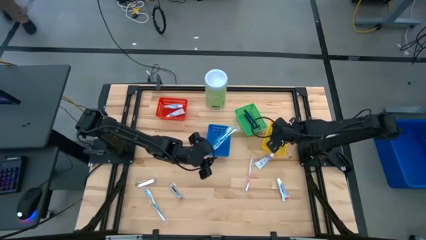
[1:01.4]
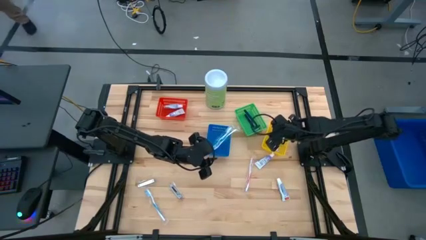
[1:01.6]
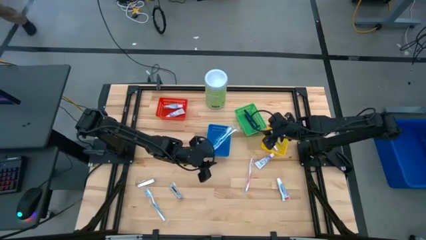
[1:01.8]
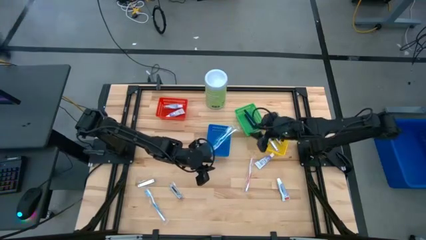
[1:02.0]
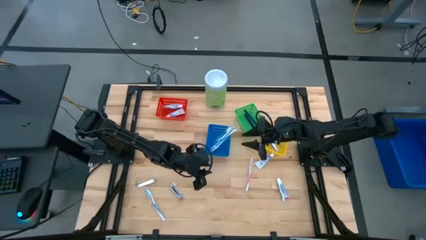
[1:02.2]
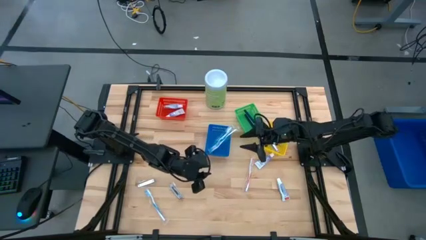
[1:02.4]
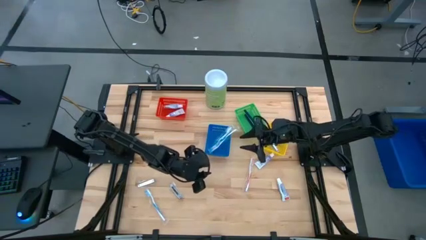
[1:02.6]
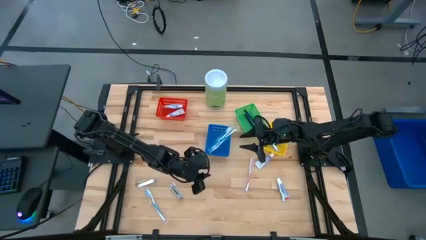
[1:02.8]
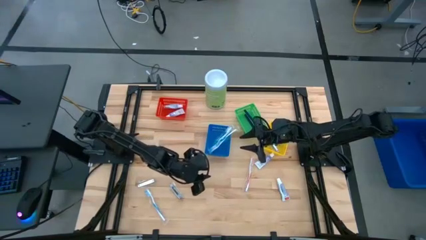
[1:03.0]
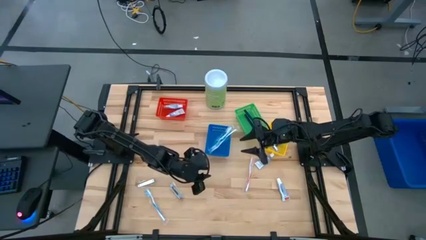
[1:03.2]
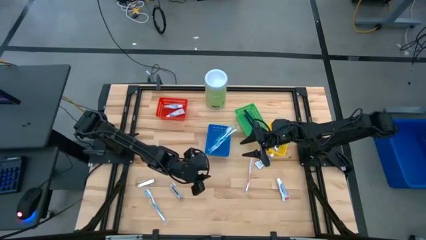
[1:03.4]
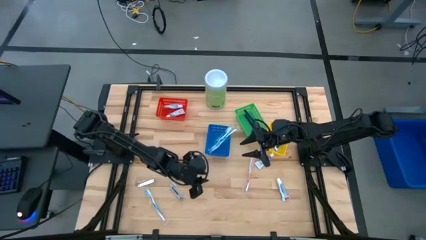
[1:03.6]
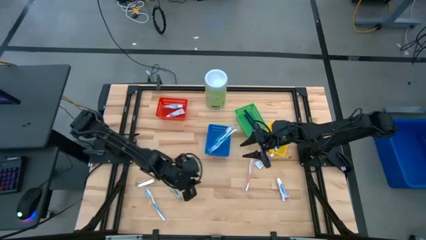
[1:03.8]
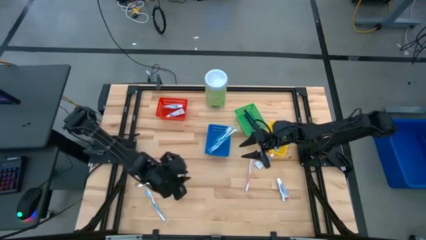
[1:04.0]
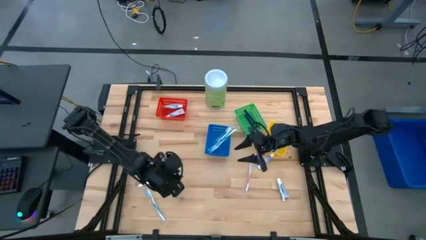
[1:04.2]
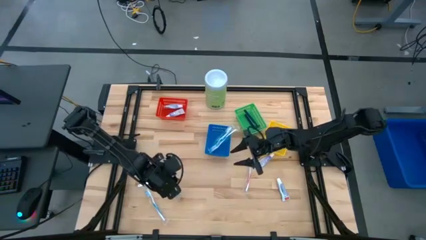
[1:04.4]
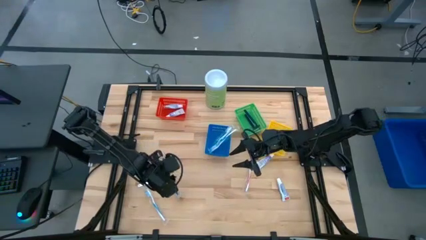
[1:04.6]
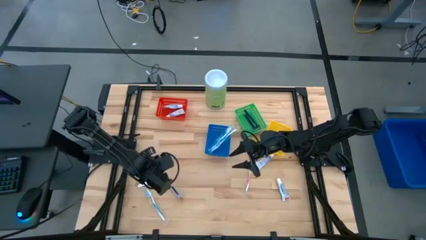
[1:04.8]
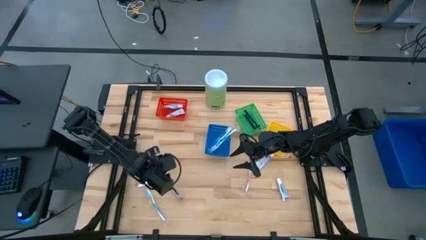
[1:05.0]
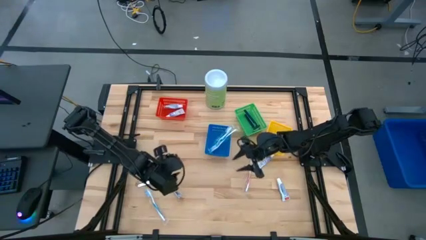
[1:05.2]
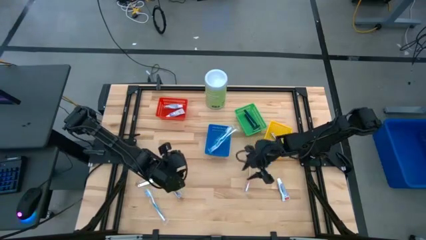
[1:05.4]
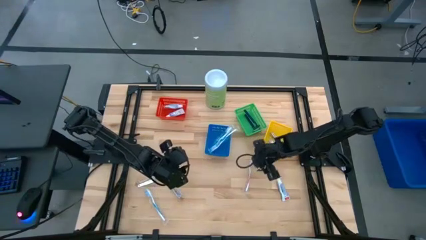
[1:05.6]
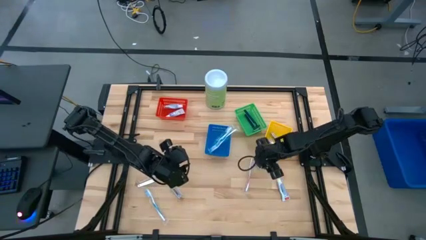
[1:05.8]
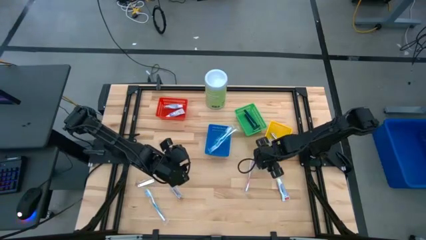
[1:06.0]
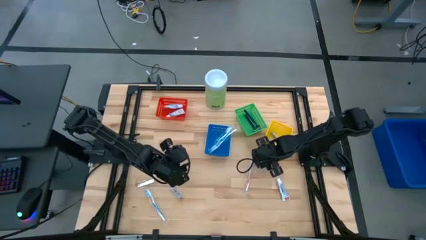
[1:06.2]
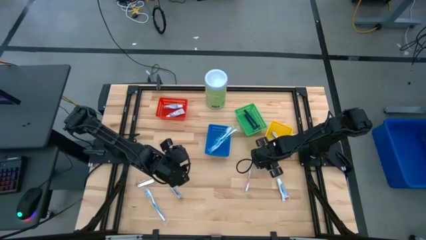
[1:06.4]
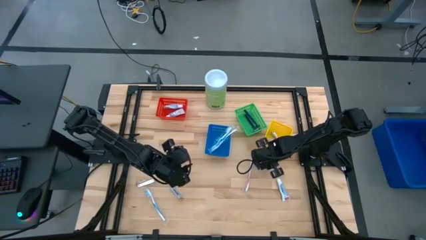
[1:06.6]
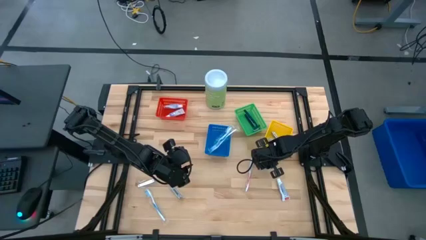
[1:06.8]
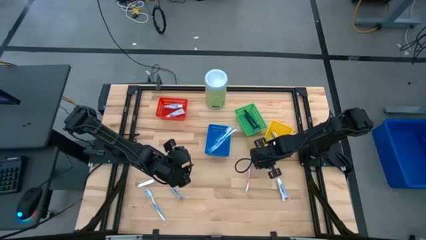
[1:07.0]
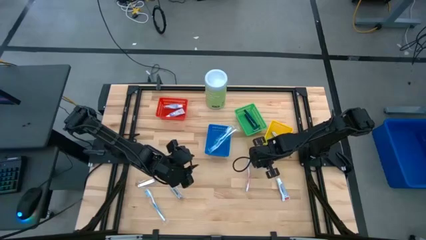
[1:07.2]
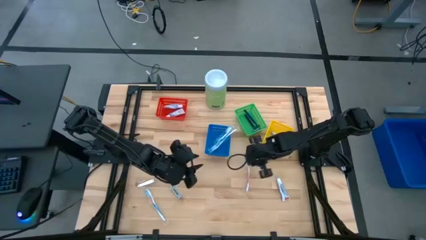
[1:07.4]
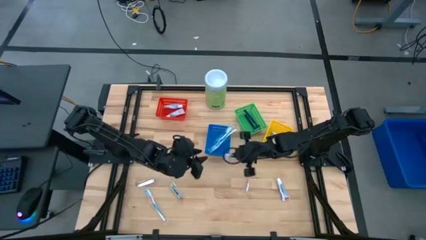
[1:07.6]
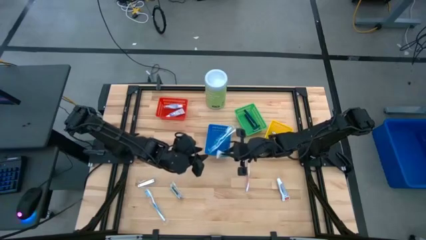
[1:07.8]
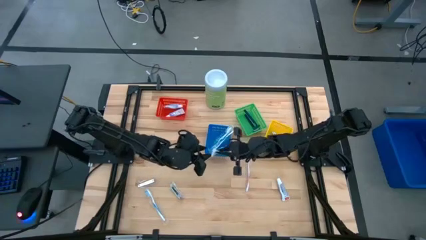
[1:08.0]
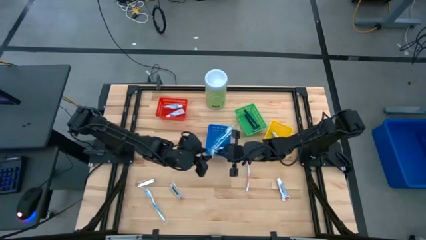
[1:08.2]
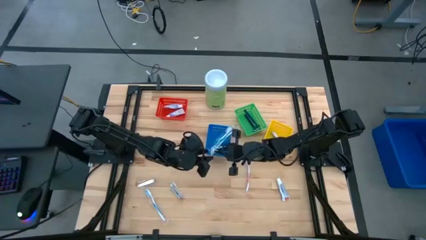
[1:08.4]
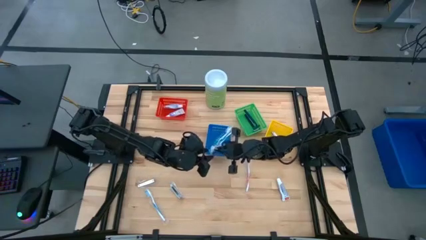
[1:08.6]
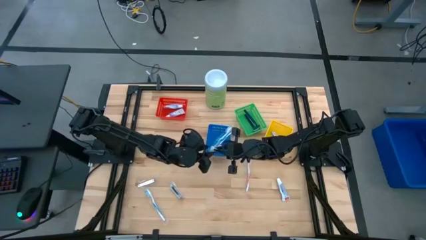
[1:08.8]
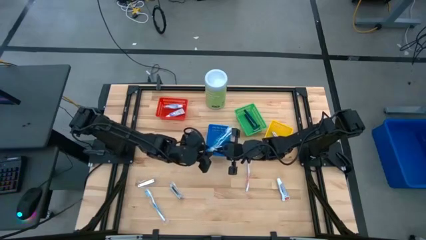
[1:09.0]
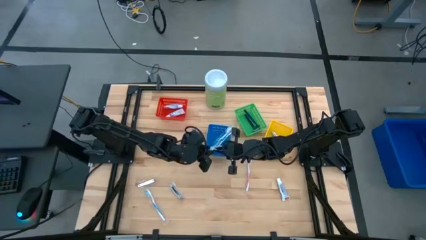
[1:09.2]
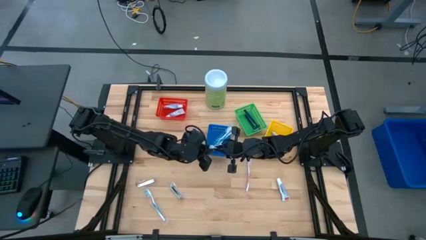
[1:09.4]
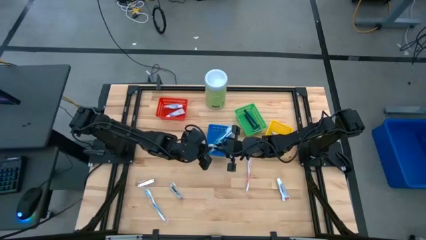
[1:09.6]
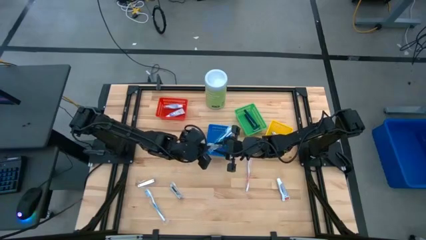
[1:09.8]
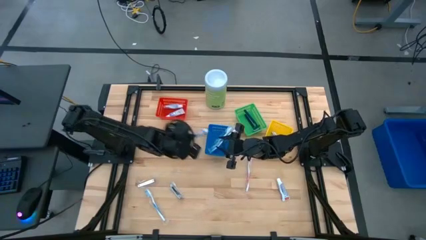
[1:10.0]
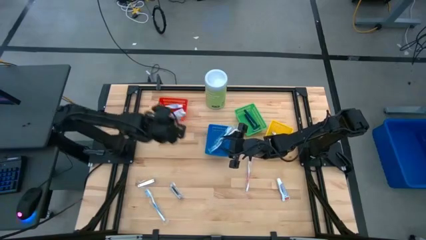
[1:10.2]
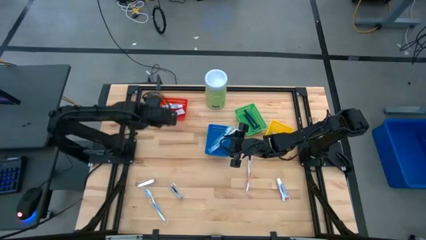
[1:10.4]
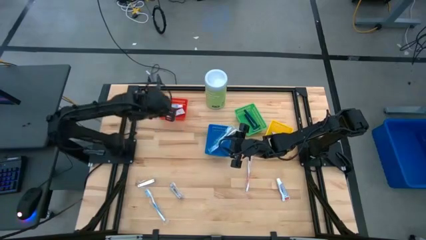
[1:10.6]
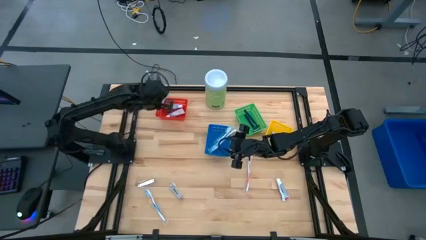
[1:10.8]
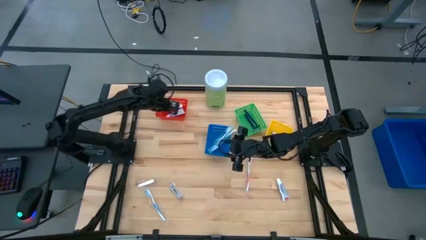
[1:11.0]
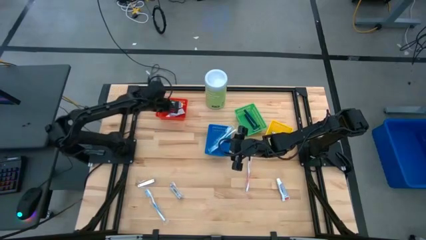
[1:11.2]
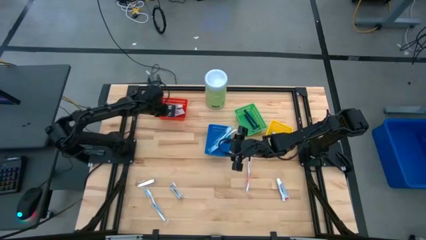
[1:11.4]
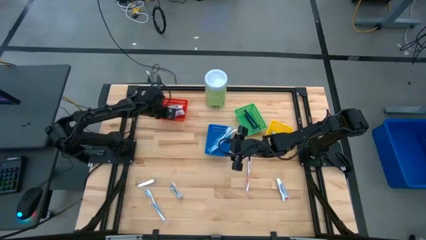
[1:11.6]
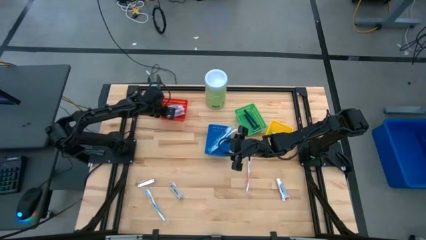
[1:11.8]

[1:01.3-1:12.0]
Task: Pick & Place Travel size toiletries
Put the white toothpaste into the red bin

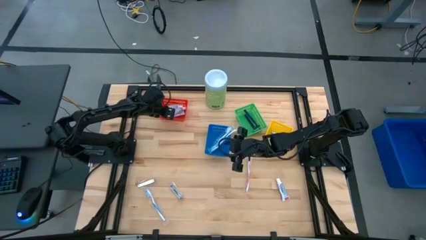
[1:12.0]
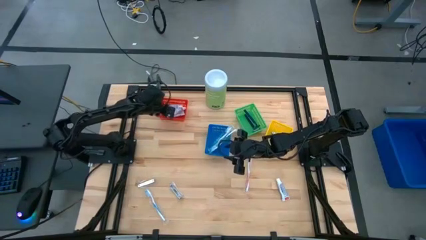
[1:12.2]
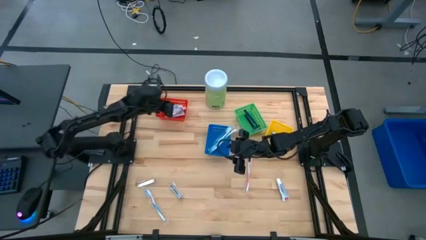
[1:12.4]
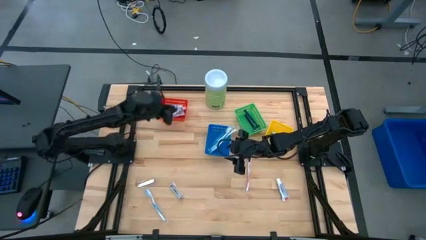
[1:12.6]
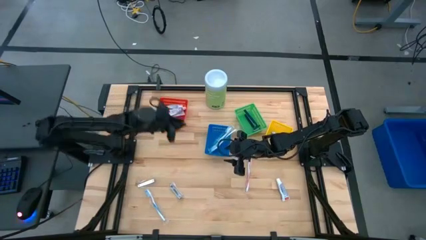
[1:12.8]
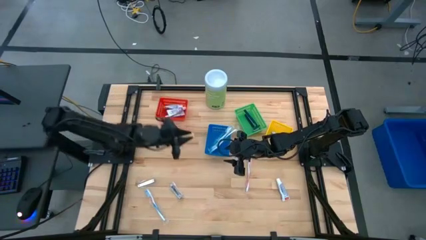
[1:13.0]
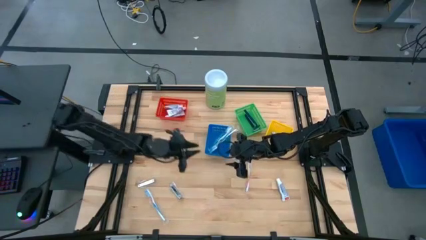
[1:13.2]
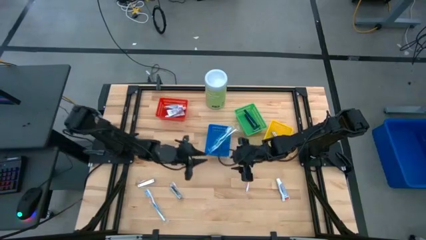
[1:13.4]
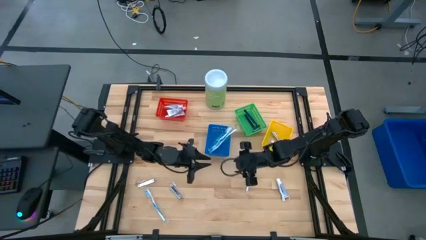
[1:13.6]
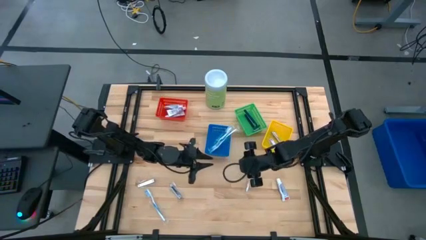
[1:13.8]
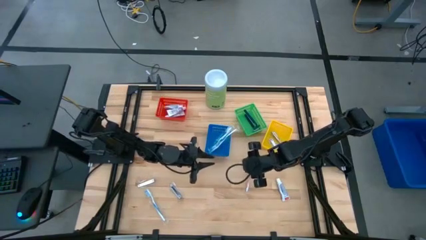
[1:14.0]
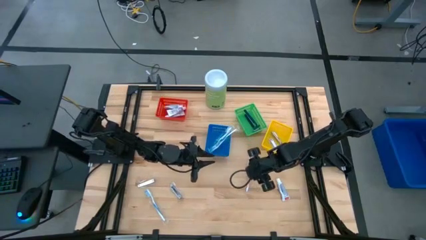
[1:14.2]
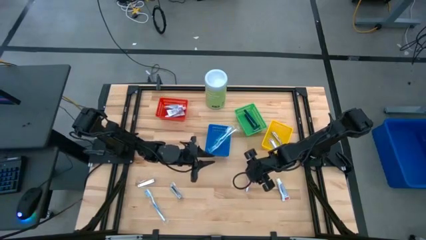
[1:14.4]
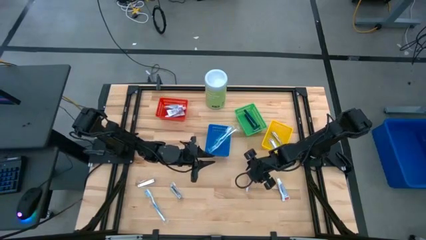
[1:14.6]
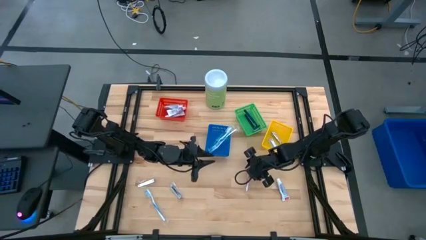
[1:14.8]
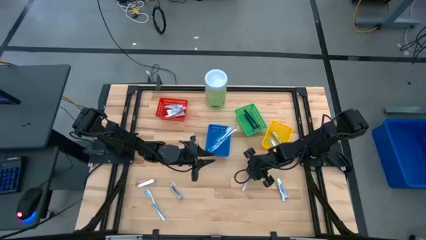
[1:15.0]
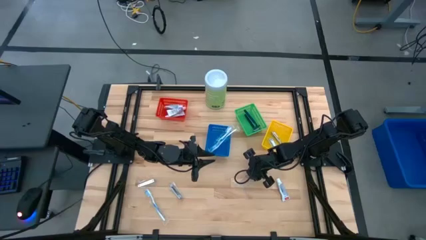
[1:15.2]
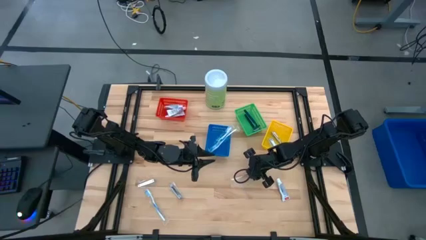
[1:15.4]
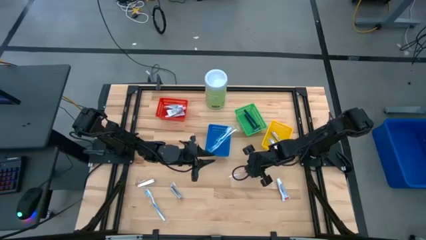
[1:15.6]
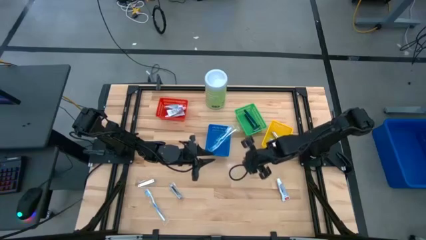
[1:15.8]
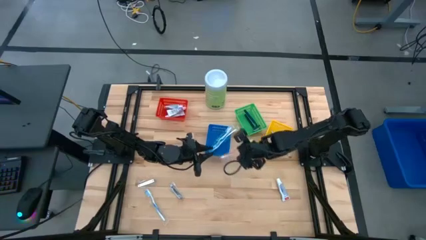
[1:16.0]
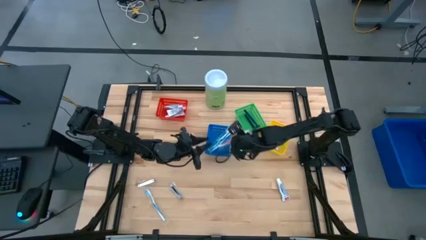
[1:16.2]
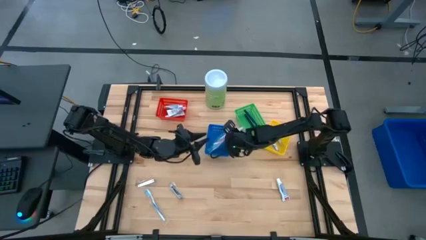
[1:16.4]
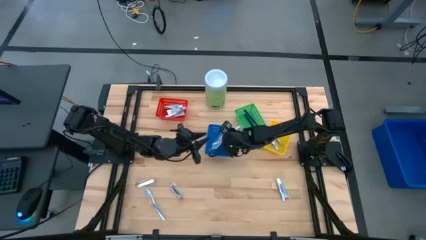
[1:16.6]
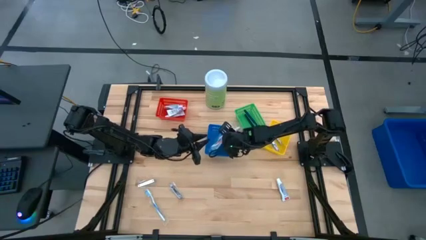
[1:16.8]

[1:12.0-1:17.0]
Put the orange toothbrush into the blue bin

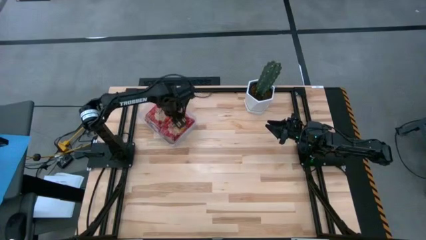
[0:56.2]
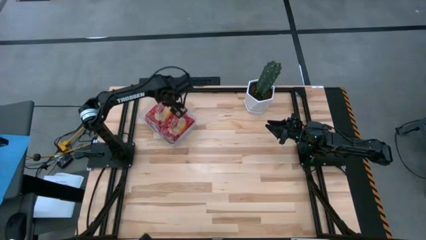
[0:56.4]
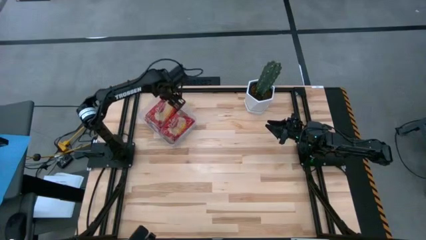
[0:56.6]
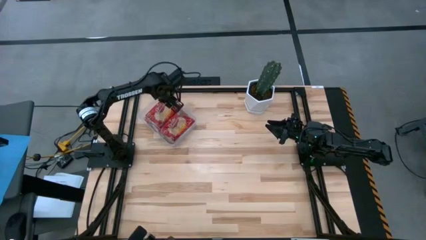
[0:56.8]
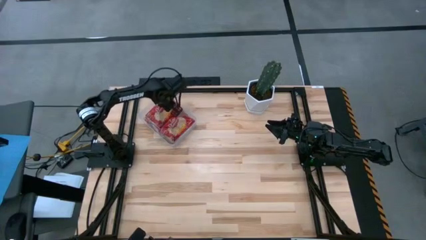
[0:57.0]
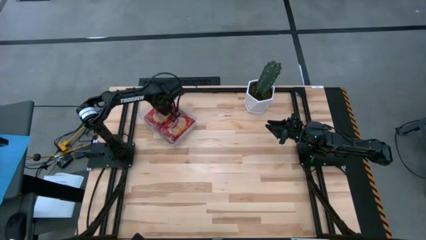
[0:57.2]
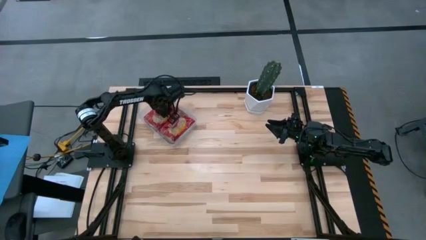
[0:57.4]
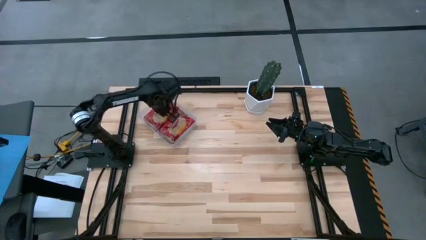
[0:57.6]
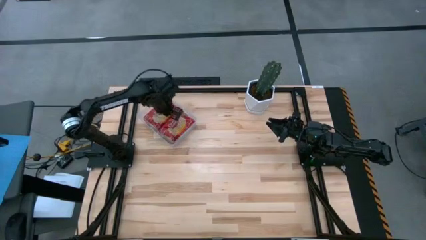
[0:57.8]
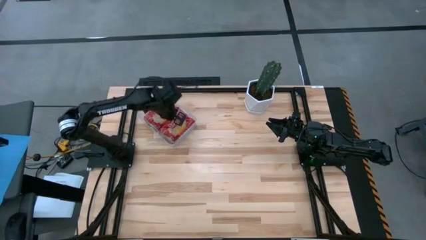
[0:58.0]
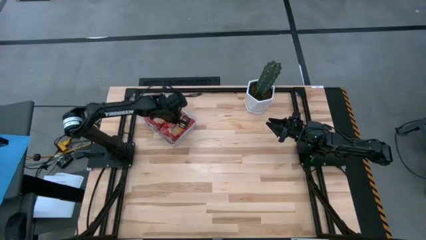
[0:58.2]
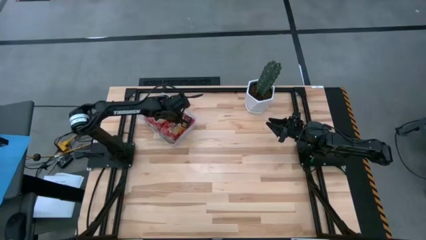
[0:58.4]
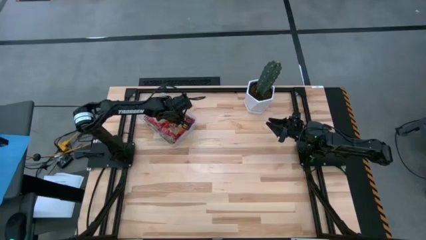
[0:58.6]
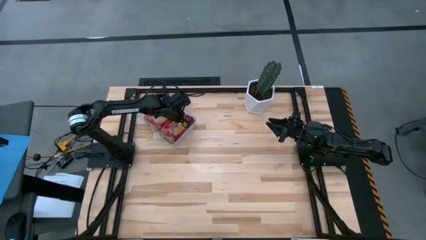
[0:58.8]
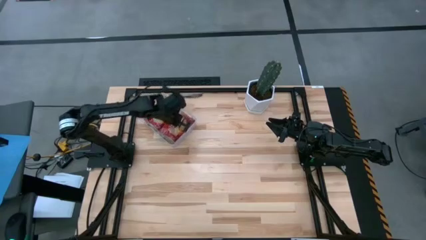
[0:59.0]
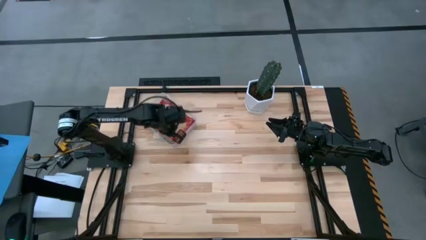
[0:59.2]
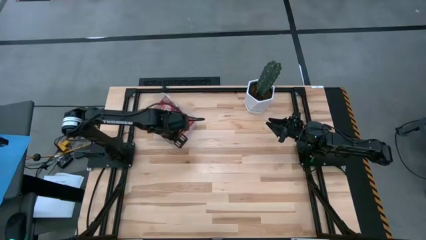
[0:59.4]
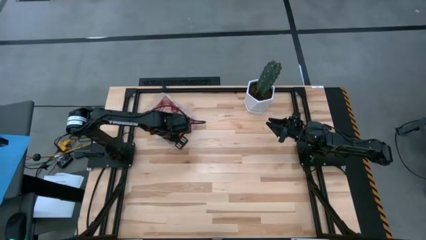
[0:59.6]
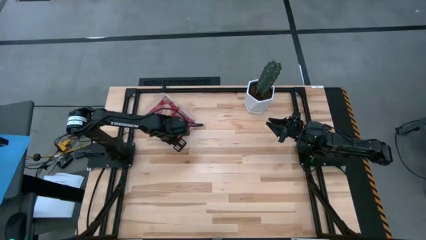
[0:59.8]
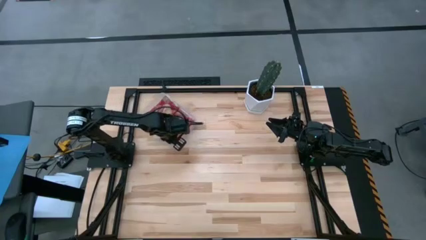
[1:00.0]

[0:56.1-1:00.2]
Task: Sort popcorn bags into baskets
Adjust the red popcorn bags in the transparent bin
